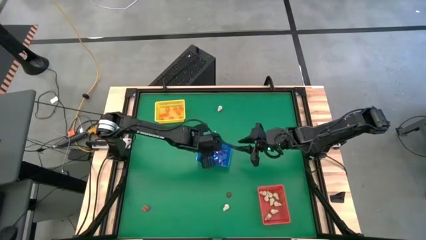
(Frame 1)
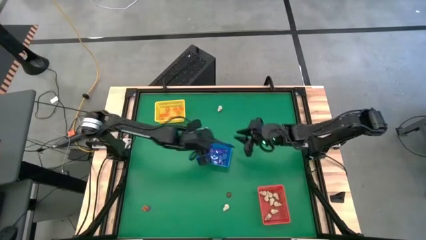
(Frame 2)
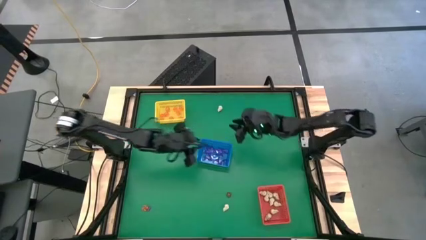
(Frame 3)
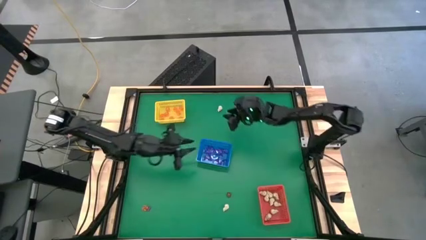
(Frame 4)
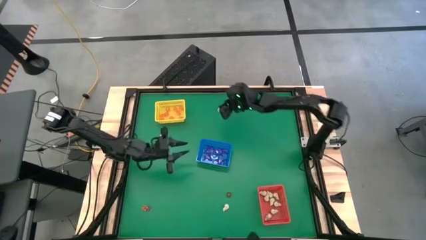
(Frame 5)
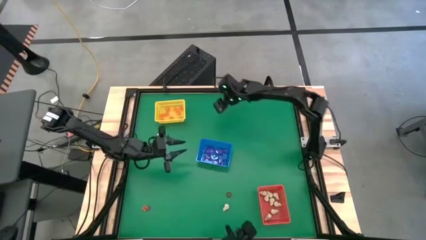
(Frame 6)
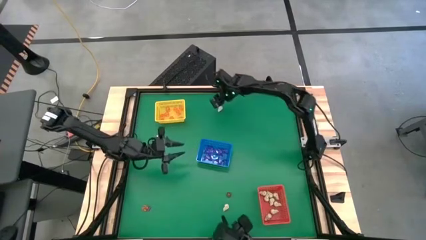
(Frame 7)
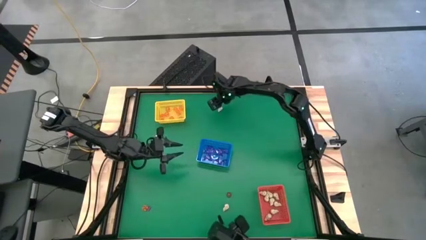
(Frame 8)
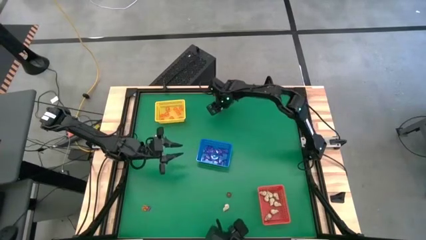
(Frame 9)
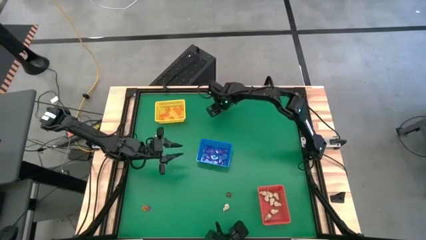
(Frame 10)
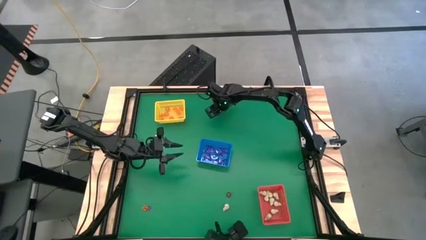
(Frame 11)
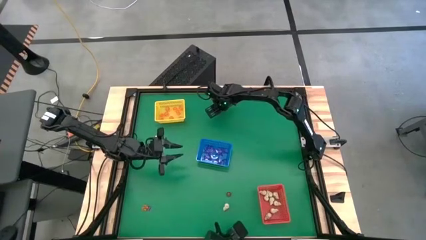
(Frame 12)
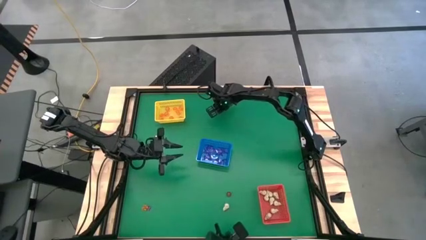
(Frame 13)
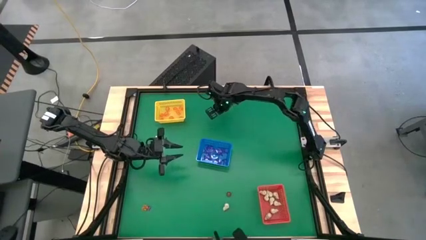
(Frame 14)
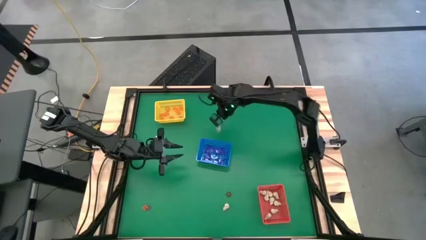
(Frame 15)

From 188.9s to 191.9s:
Task: Sort Halloween decoration
Put the skull toy into the red bin

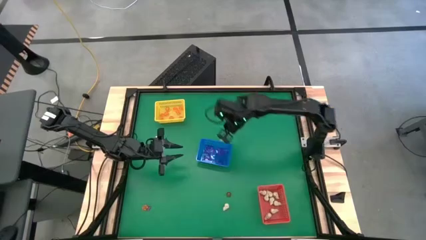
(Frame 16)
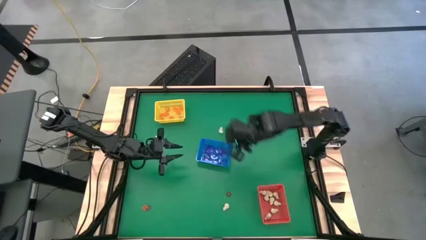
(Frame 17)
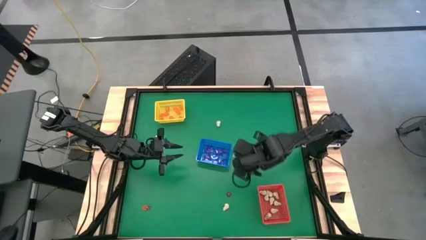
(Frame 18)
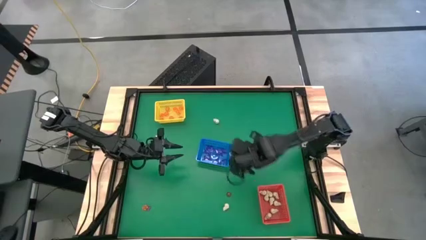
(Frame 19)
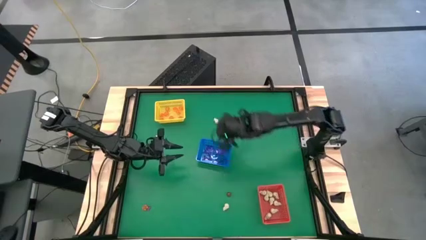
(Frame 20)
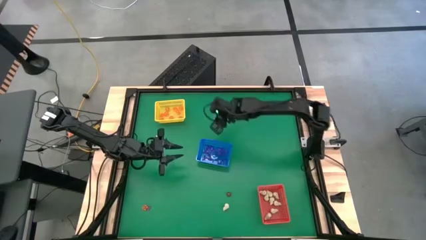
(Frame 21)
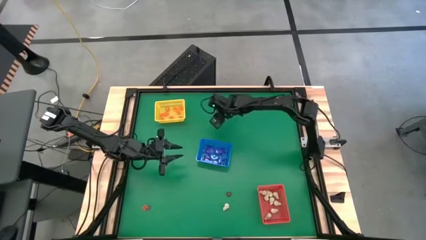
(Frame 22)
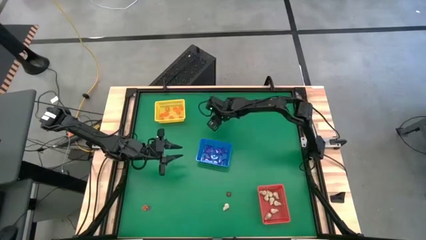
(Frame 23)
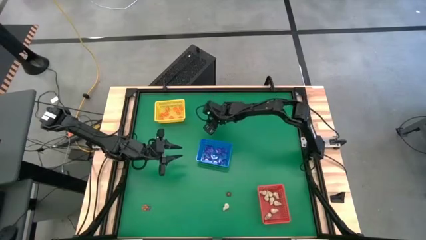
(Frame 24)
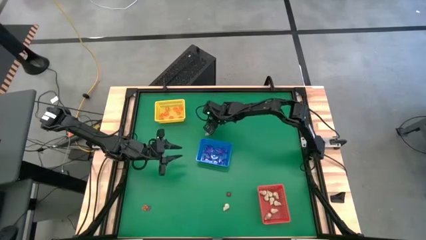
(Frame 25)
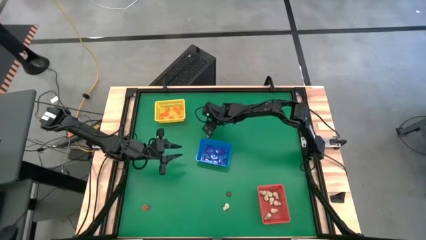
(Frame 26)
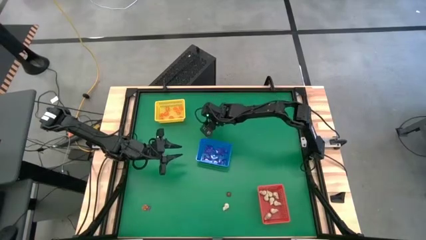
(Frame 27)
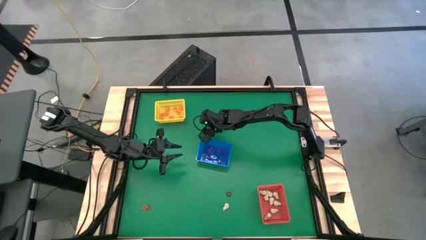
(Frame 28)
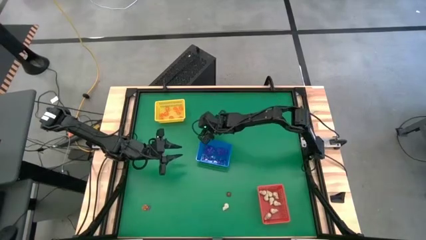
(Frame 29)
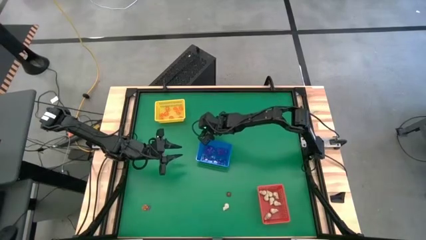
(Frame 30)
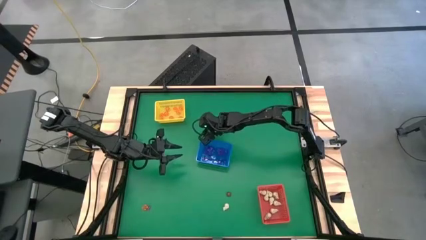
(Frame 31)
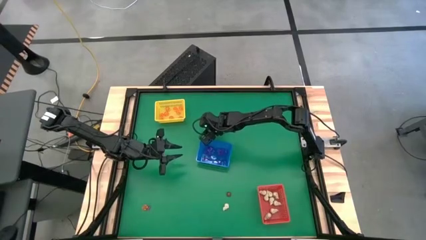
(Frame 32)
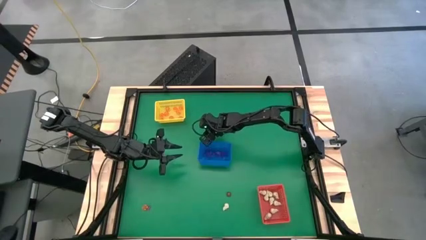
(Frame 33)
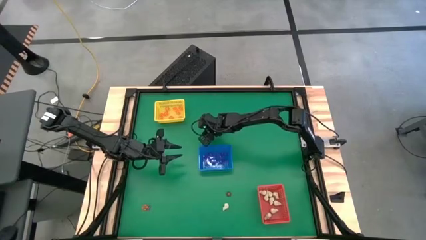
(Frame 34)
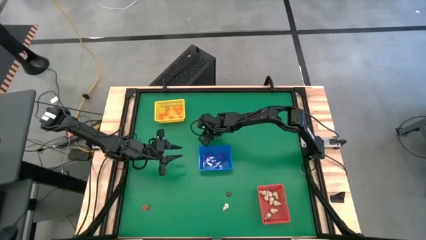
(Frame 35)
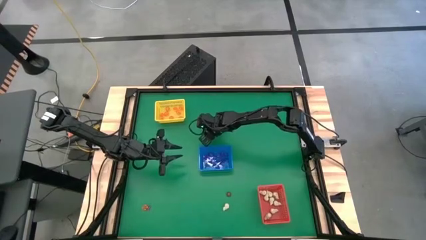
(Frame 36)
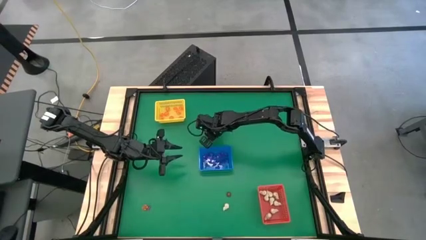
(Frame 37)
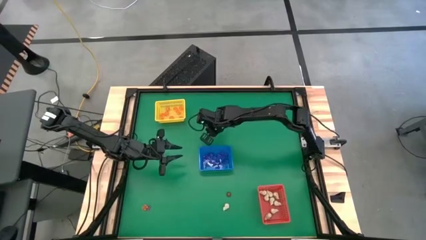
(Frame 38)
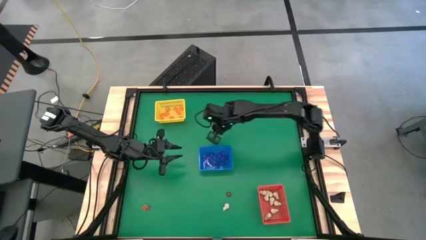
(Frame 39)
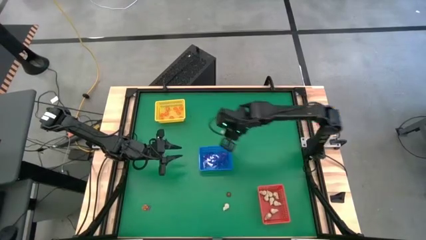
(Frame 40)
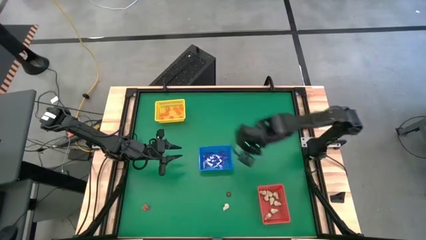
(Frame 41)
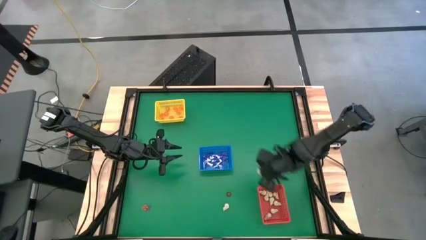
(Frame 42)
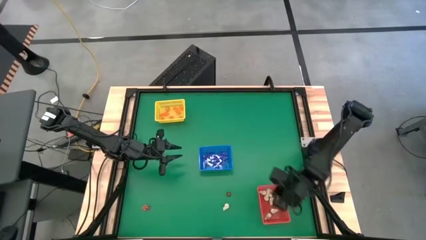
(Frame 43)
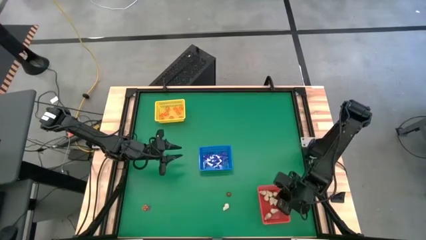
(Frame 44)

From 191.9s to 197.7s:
Put the skull toy into the red bin

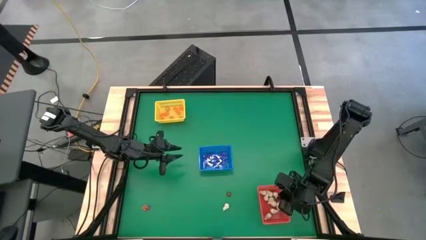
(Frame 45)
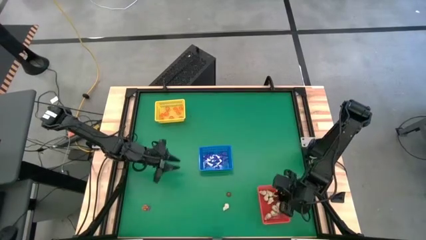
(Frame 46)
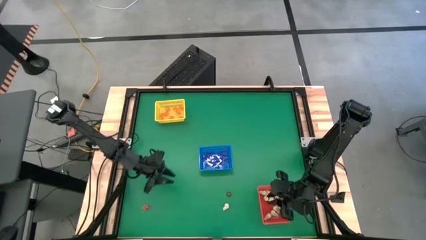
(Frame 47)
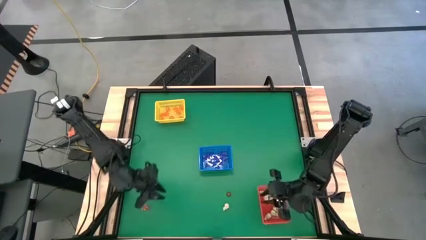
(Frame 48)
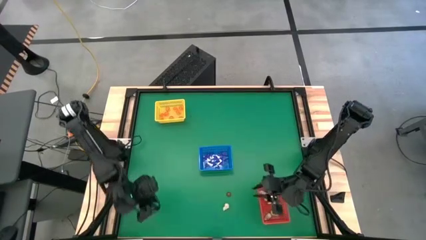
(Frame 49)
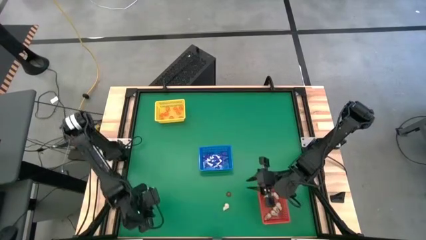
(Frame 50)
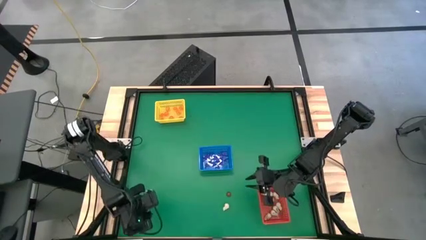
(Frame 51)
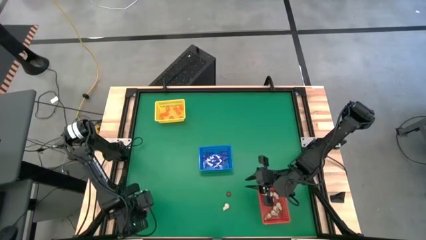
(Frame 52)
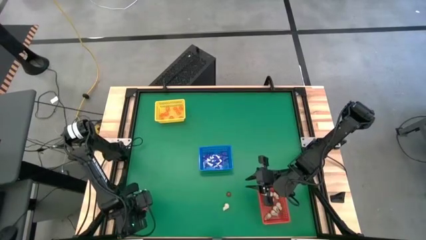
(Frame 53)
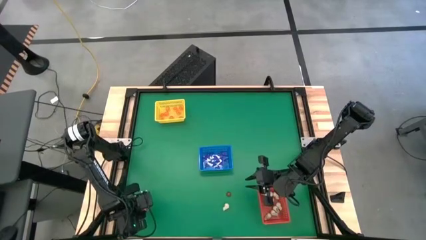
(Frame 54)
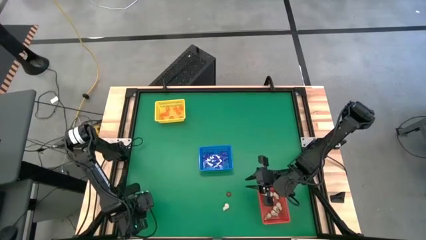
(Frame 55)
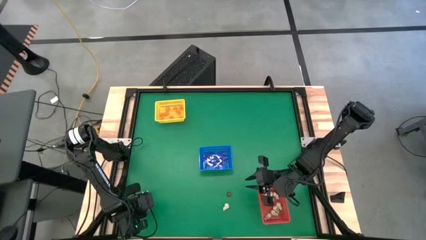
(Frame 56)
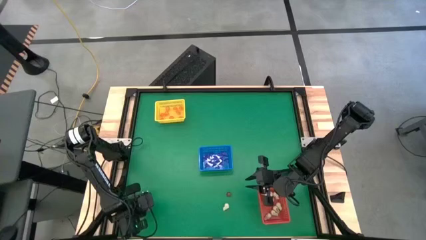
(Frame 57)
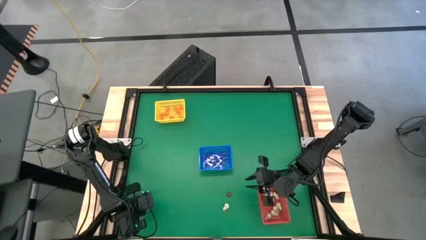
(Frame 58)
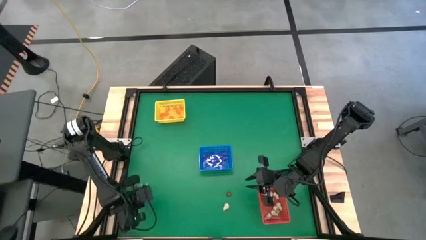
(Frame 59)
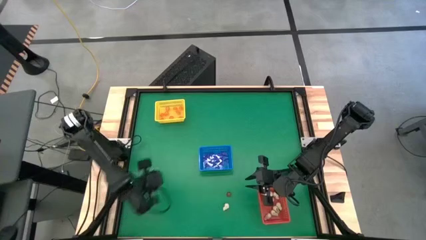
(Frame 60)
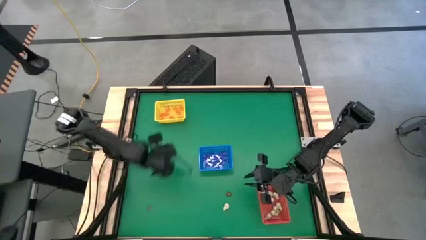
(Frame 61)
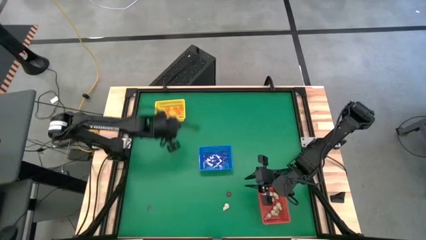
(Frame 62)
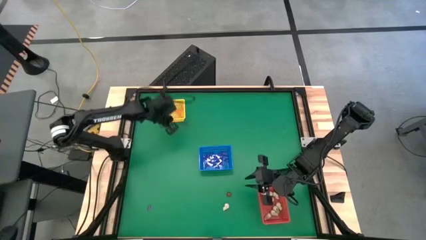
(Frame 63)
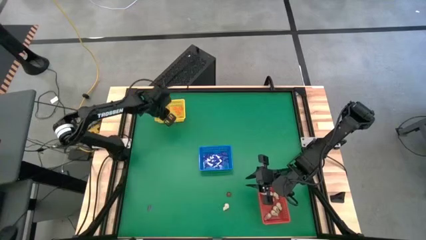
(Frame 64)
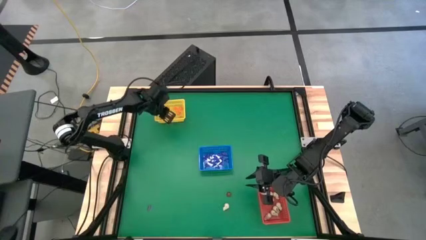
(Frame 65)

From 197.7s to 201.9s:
Put the pumpkin toy into the yellow bin

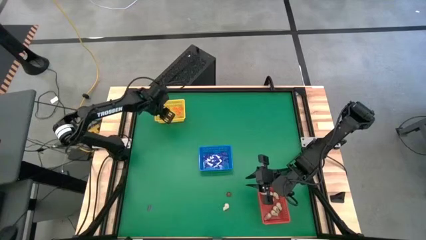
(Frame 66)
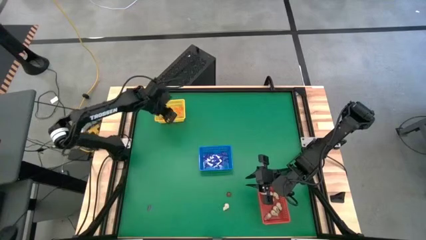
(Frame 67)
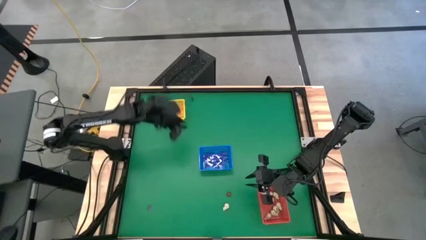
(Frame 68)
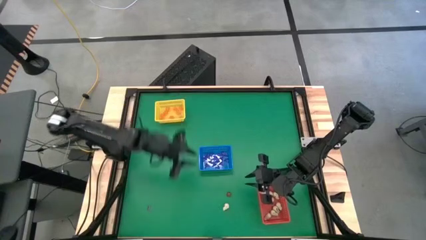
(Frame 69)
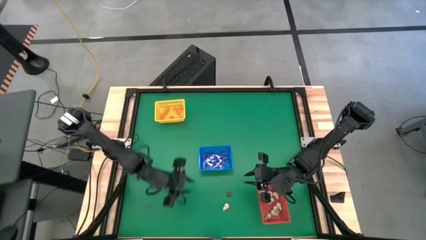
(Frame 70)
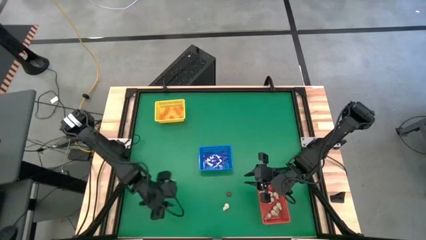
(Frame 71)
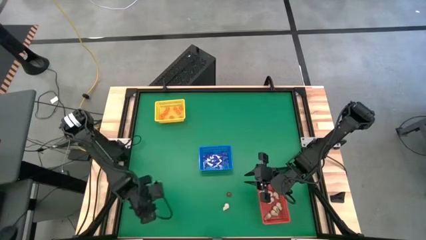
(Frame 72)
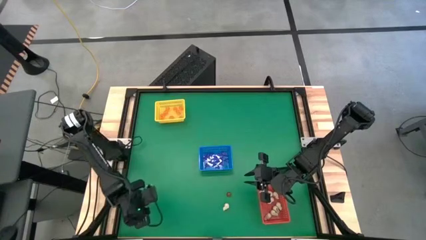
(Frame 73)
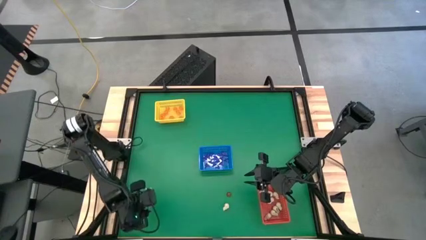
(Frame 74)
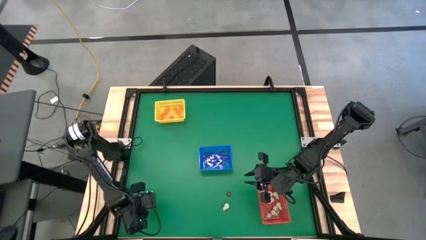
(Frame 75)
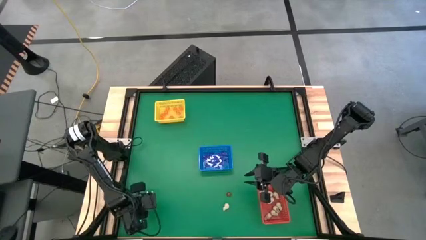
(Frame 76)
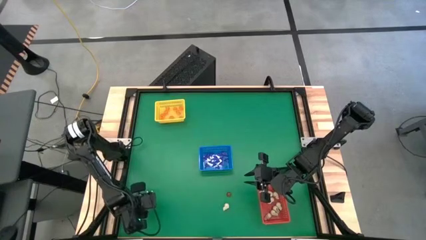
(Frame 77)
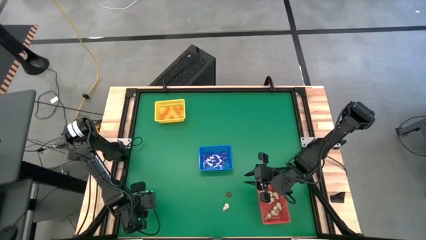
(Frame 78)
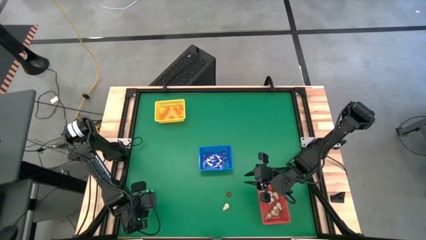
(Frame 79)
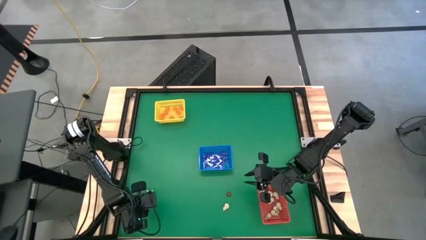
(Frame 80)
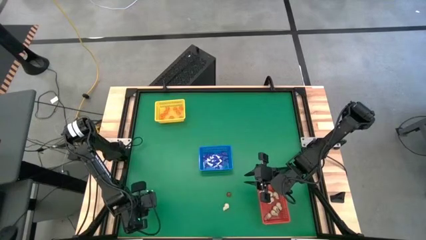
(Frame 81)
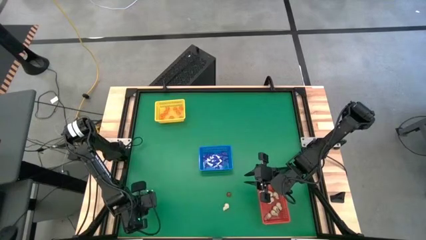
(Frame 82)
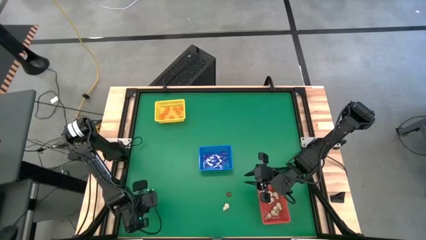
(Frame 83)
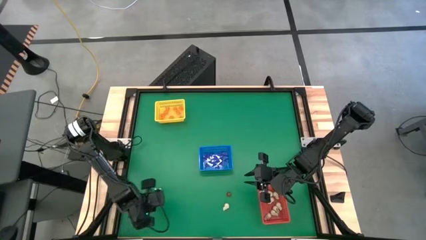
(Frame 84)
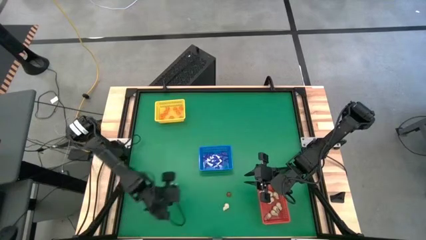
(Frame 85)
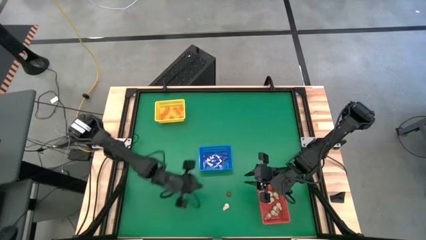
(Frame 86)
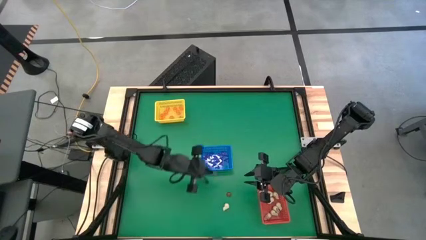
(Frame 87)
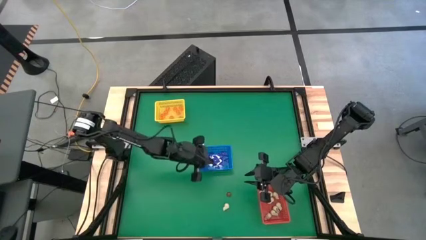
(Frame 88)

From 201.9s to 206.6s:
Put the witch hat toy into the blue bin
